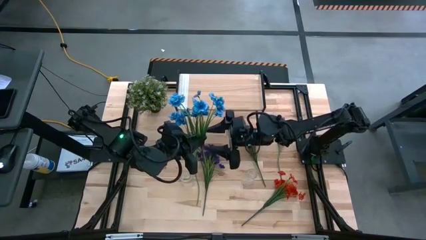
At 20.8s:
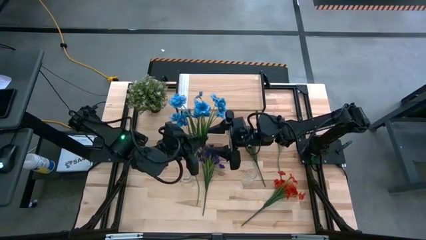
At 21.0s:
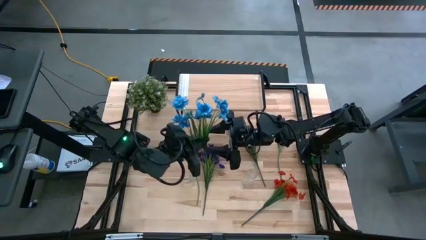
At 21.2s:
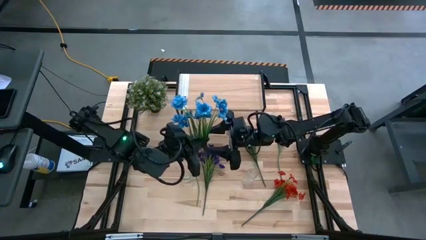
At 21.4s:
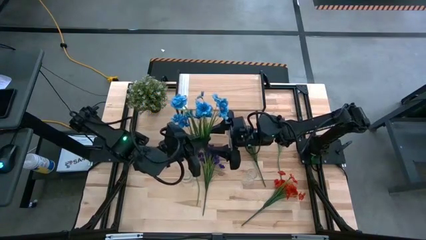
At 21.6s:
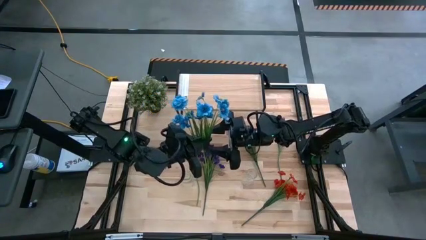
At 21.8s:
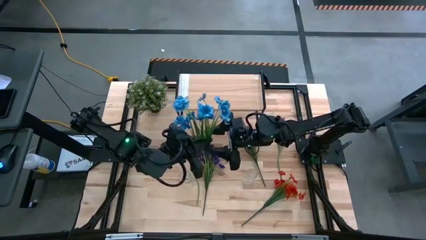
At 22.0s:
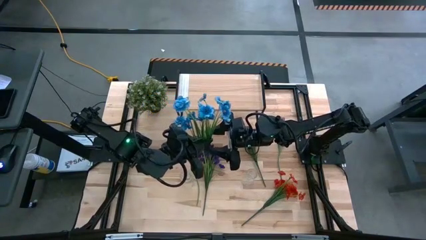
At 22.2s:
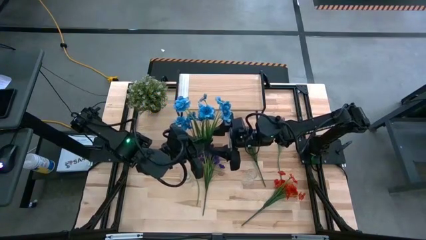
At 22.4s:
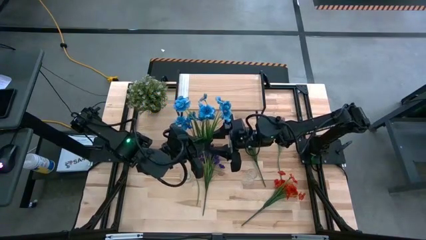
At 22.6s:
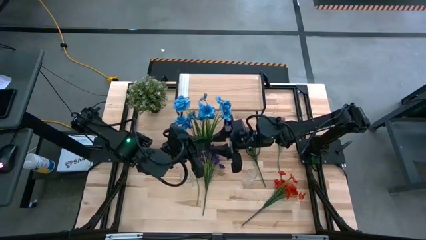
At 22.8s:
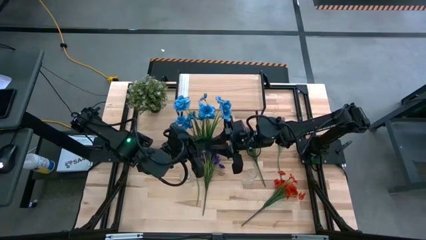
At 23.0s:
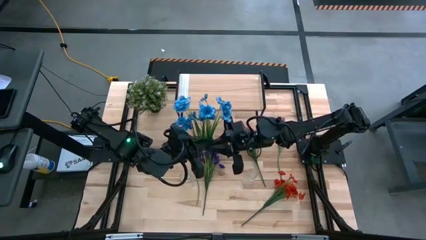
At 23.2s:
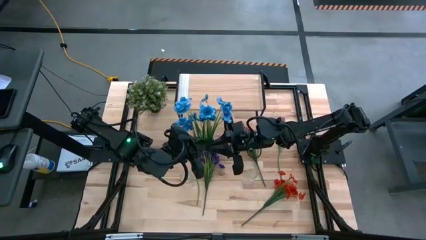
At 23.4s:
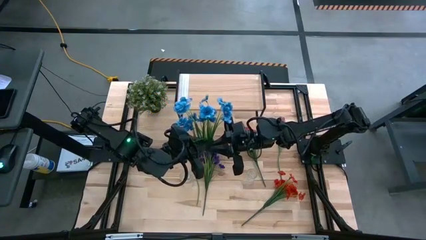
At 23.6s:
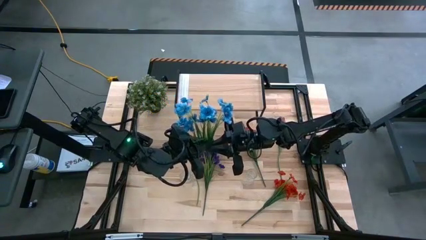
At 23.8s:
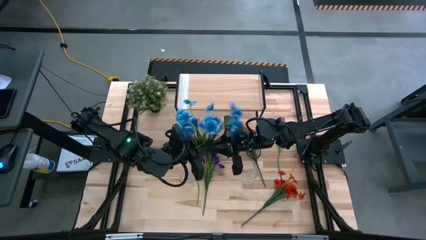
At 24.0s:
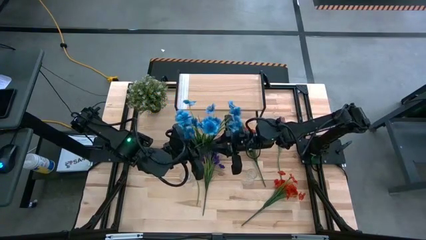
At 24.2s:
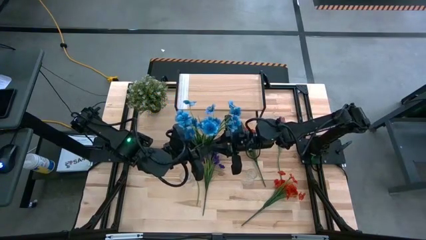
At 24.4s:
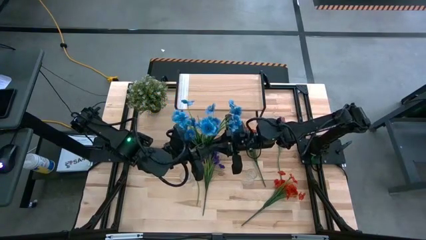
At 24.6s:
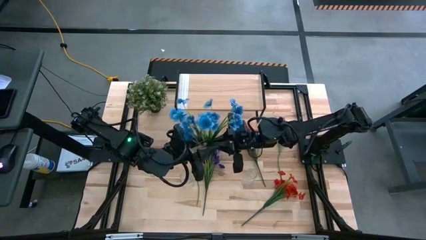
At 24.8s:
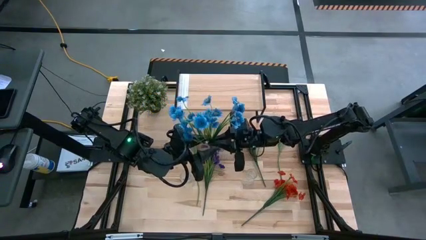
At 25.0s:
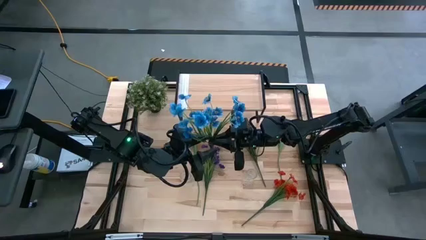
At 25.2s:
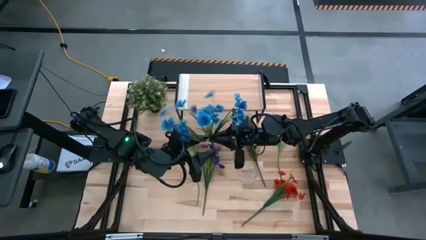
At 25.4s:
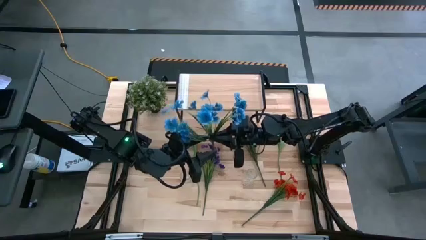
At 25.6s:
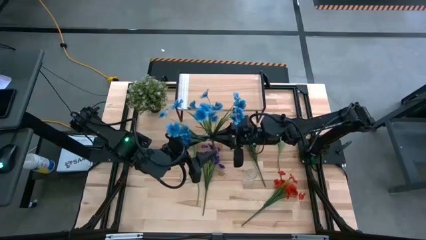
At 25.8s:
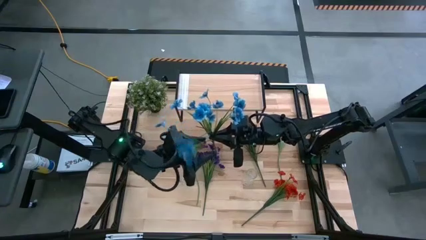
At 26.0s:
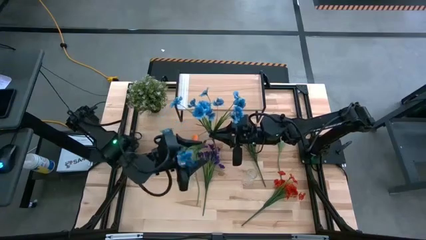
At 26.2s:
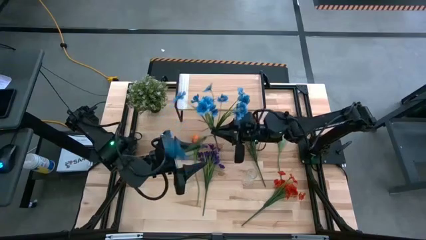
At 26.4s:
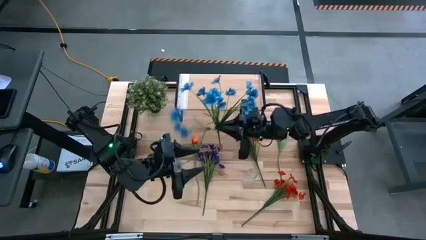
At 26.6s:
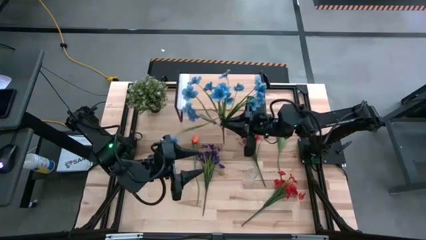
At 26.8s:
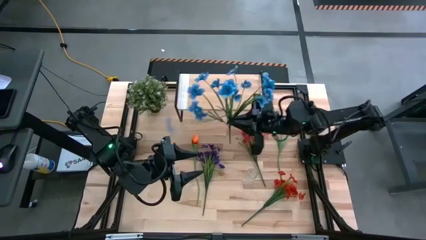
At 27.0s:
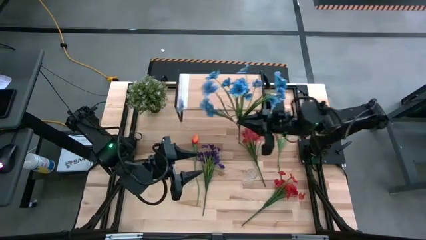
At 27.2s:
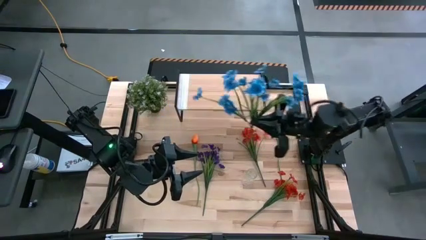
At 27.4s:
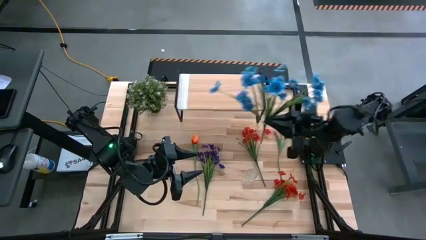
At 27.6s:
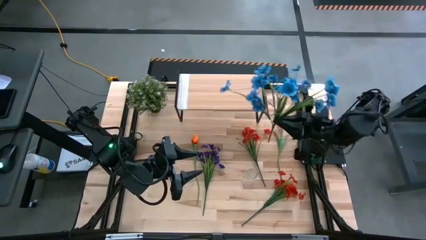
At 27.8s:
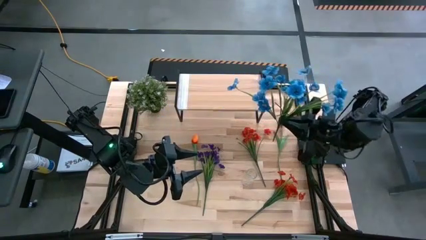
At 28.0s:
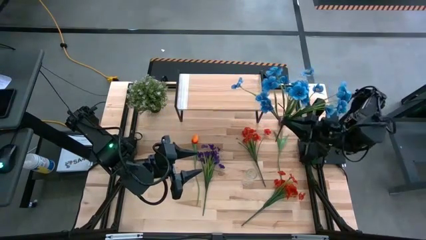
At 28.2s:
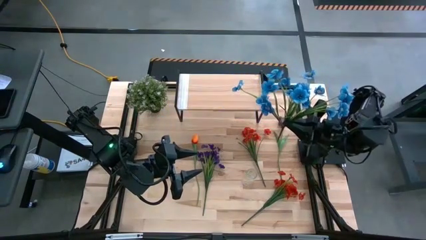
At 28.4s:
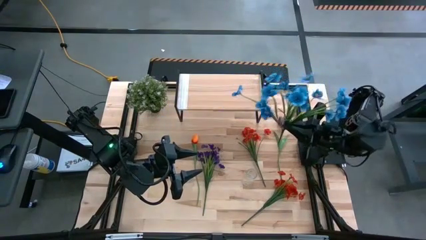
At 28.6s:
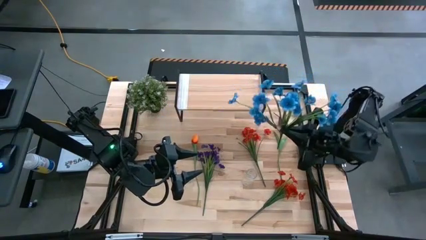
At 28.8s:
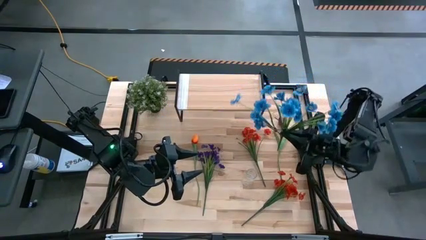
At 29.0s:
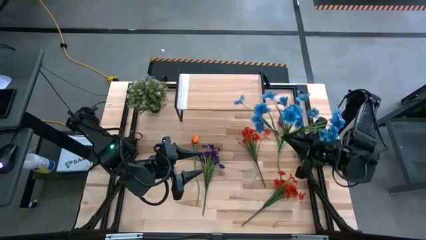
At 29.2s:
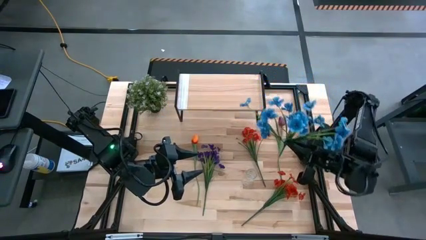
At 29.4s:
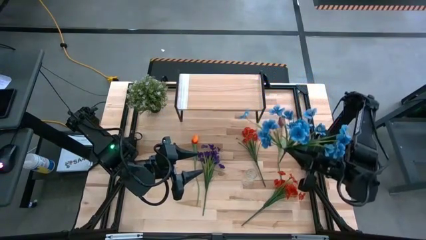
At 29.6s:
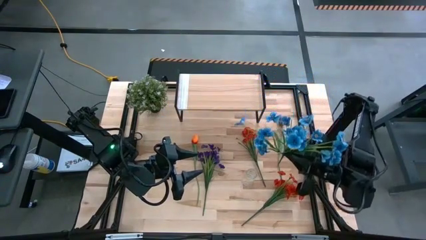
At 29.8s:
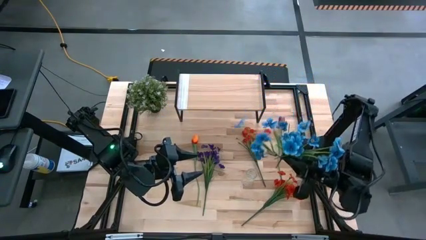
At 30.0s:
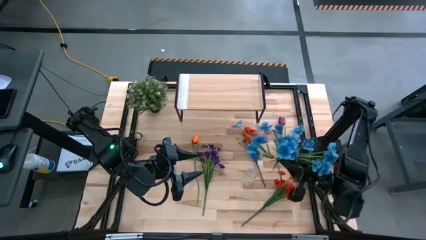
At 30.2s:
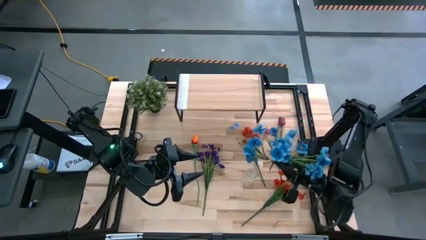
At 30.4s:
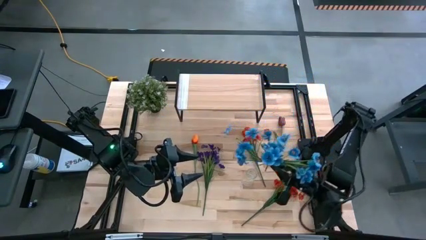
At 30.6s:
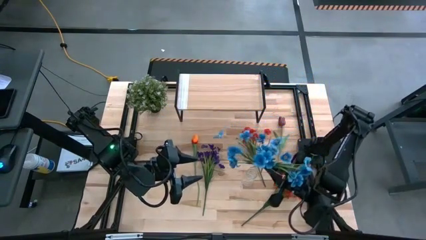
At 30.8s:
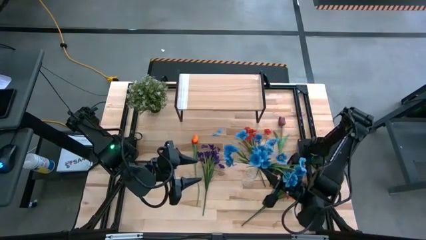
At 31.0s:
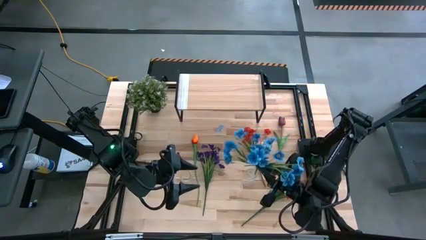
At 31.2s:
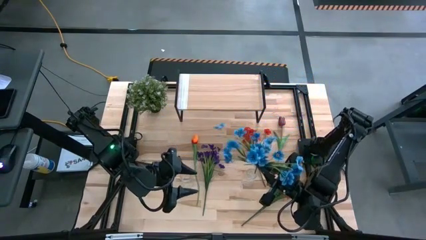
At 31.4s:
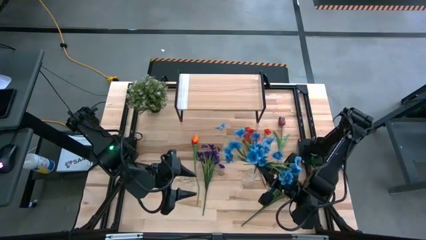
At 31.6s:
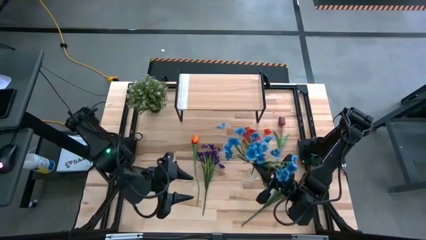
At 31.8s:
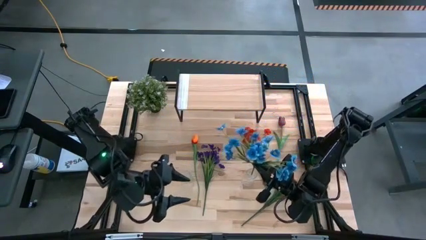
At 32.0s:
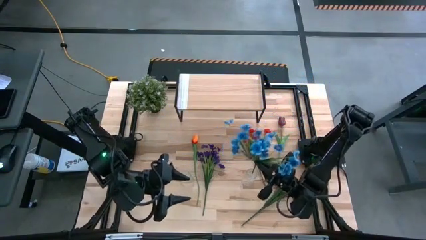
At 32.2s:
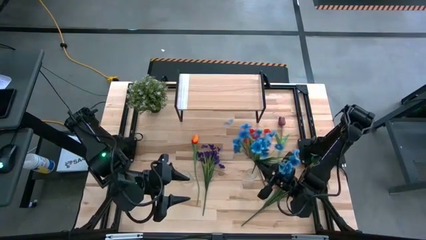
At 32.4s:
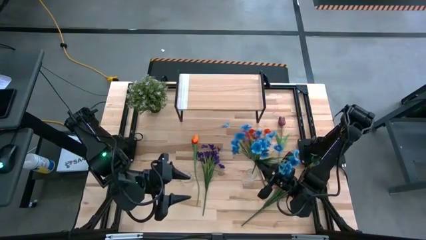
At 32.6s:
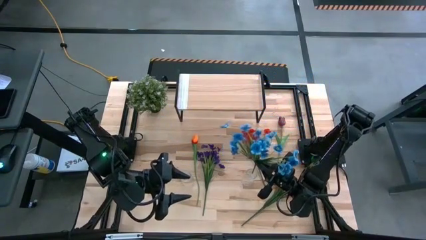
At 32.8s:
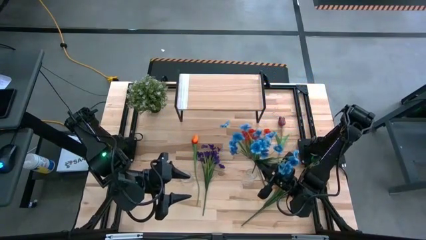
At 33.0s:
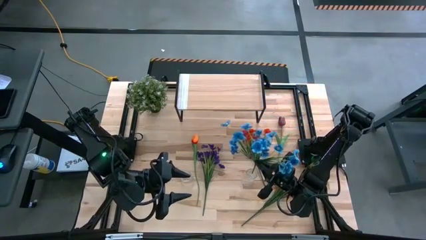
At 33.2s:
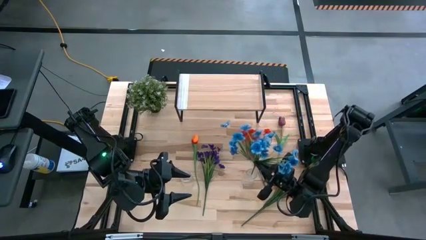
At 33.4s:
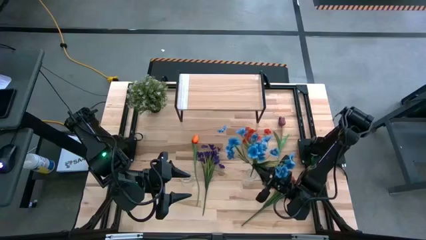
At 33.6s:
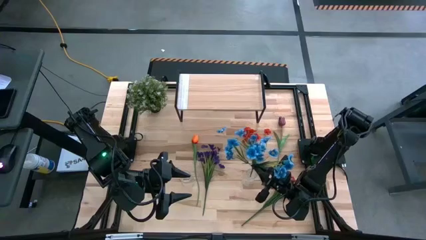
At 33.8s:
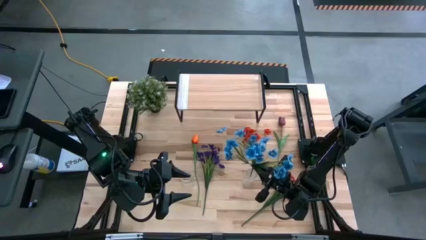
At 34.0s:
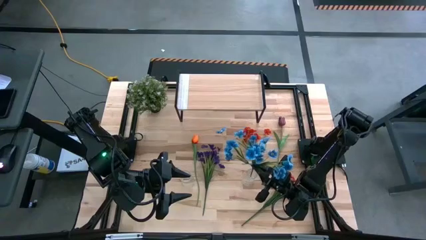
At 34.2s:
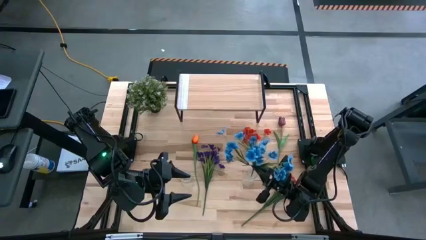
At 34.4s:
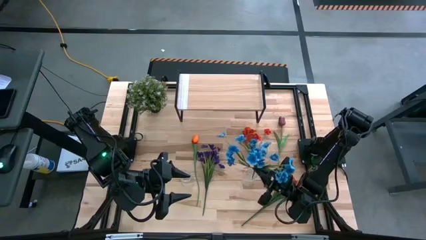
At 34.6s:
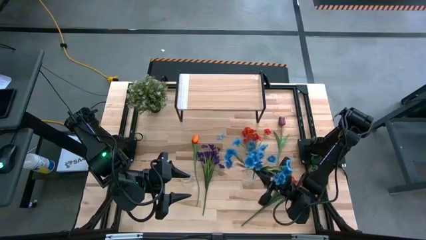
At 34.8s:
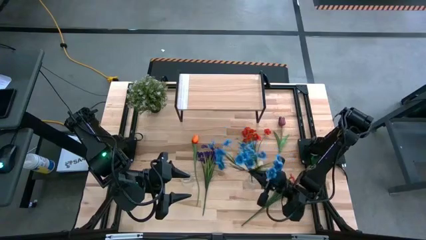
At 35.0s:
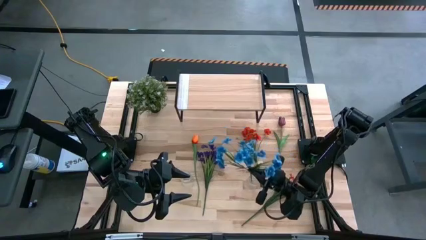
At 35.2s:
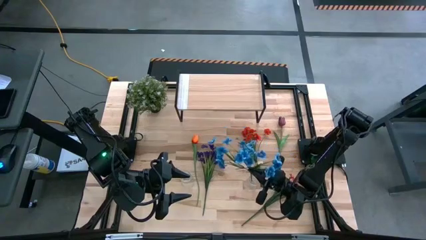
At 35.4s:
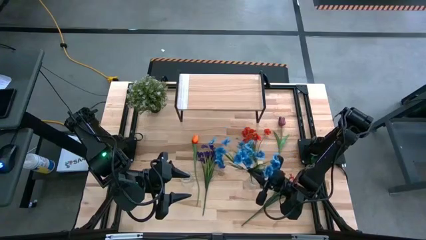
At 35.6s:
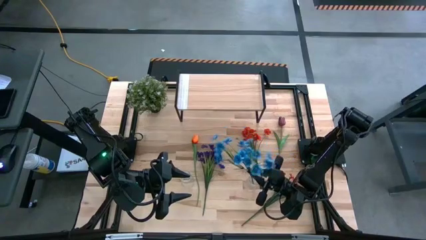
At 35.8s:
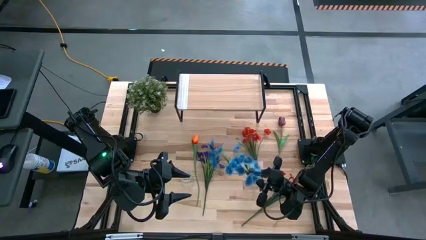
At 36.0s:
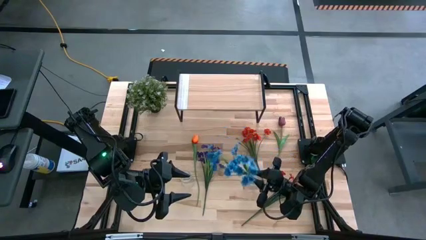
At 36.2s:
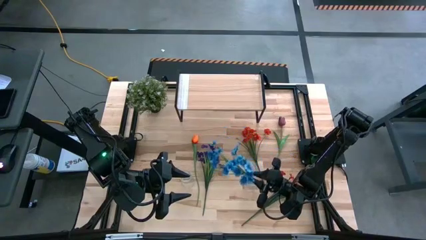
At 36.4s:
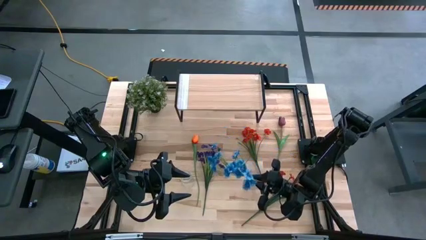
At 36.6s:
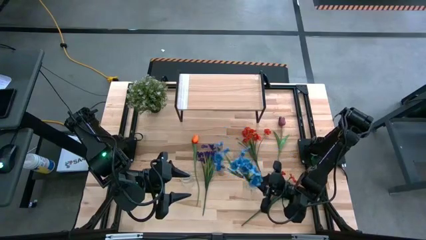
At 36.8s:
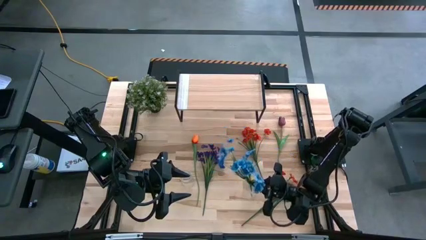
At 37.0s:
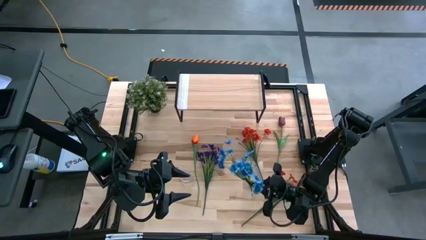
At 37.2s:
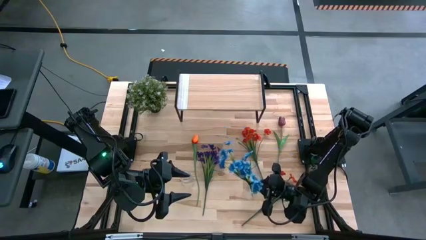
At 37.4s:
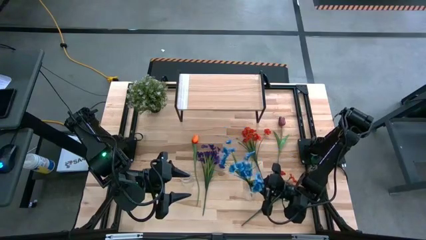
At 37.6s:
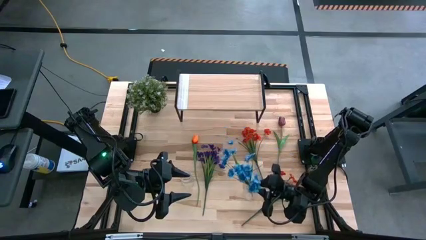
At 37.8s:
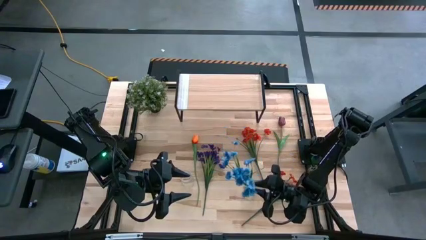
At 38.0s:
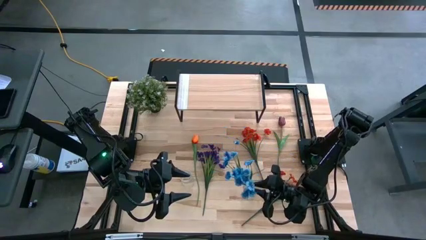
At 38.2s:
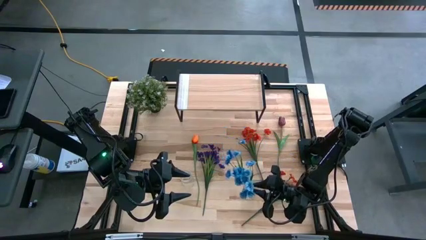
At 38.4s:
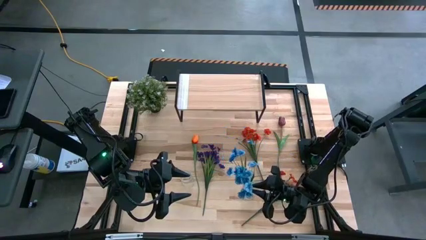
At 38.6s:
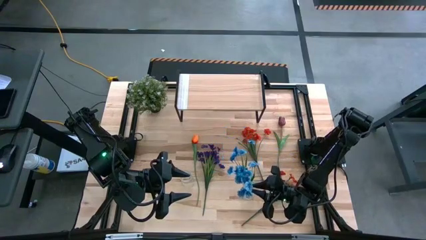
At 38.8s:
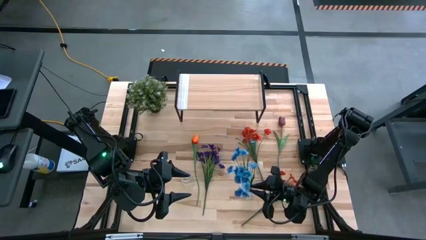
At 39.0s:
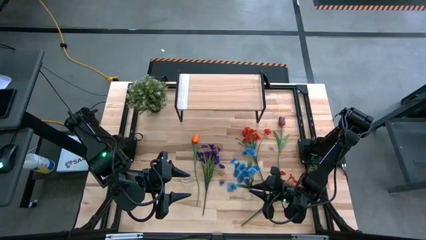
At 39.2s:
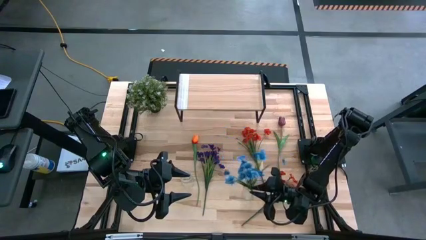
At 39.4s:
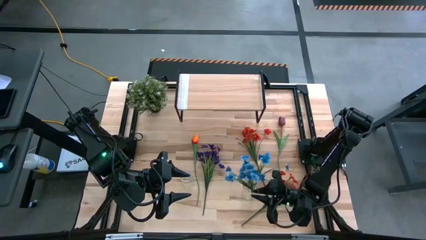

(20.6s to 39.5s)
Task: Pick and place flowers into a vace then onto a shelf
Put the blue flowers into the right transparent vase
